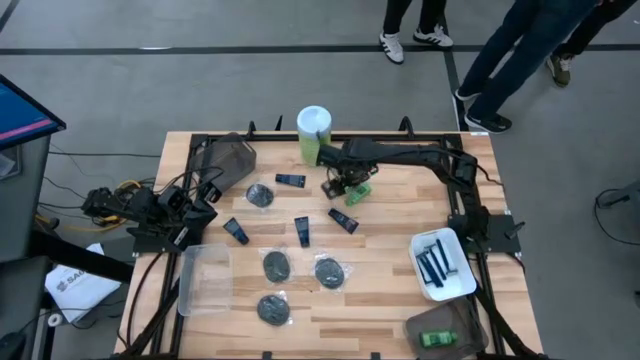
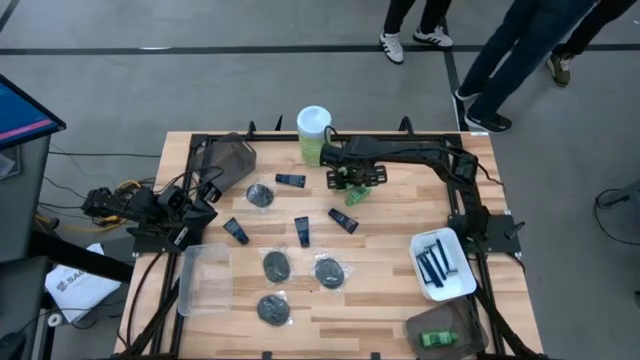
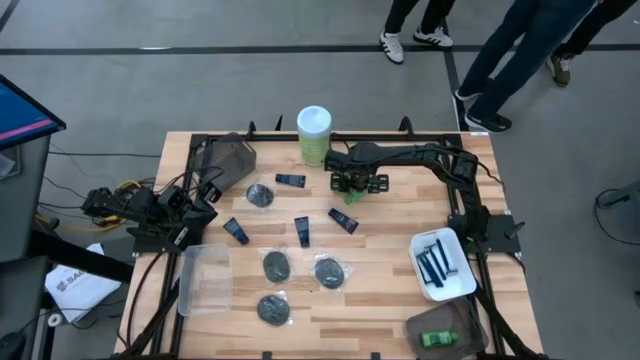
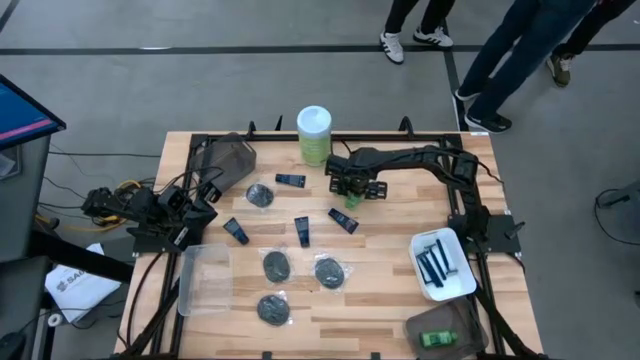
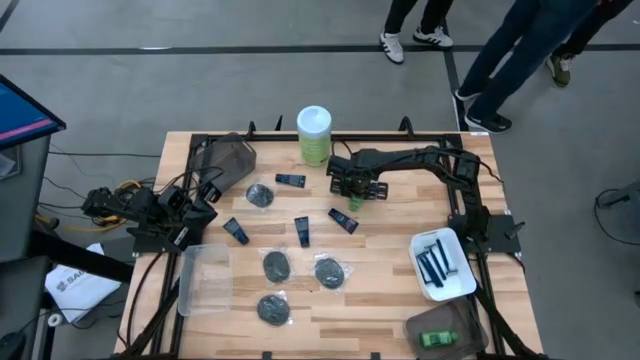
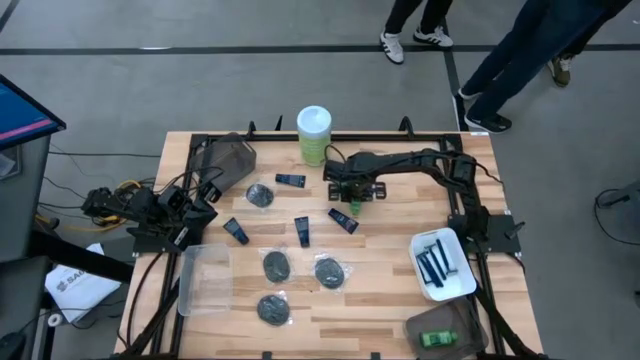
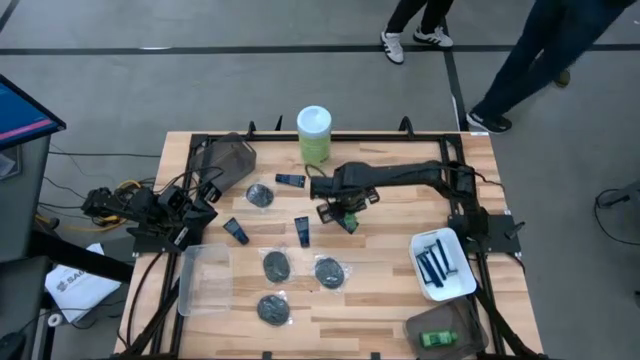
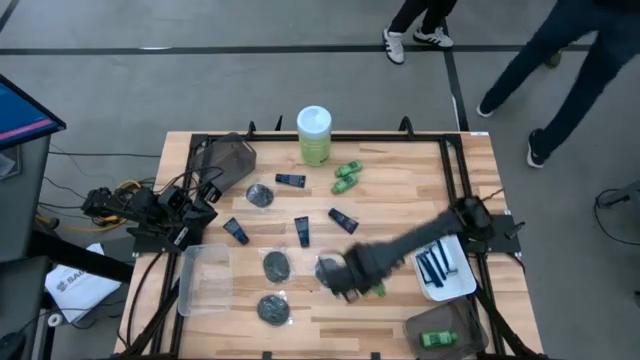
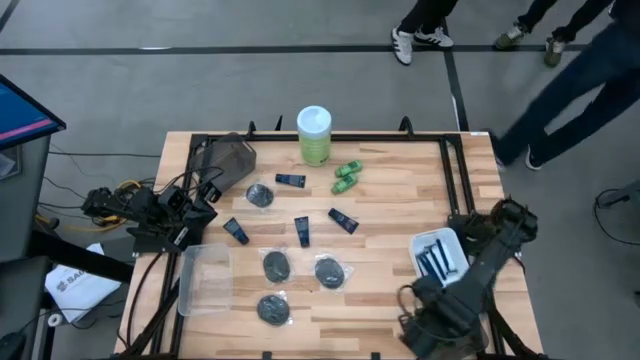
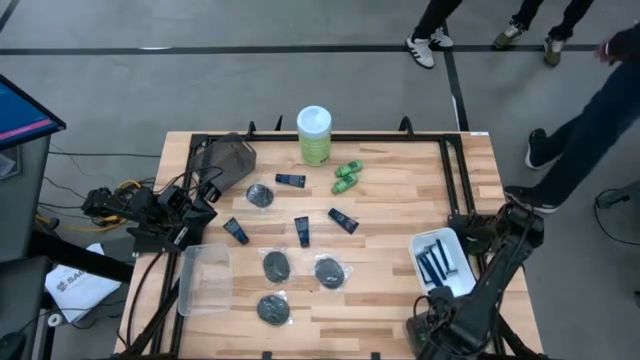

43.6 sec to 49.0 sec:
Task: Pick & Place Travel size toiletries
Put the green shampoo into the bottom black bin

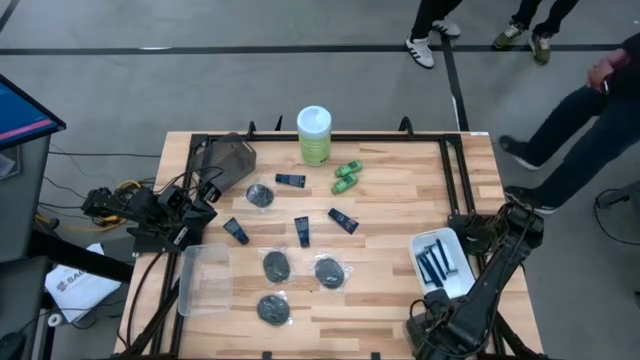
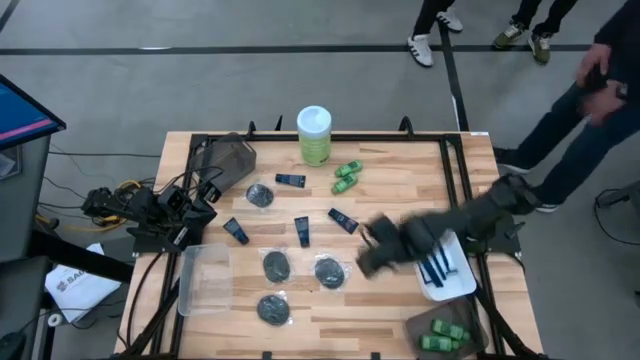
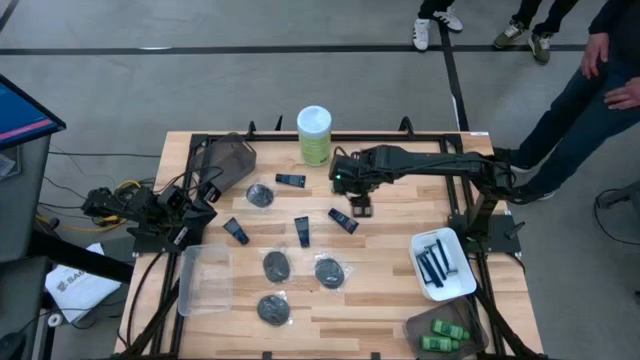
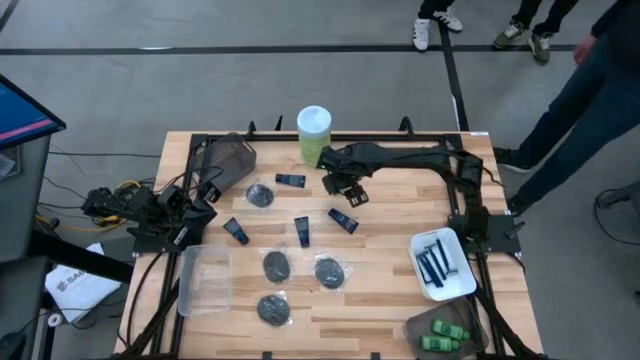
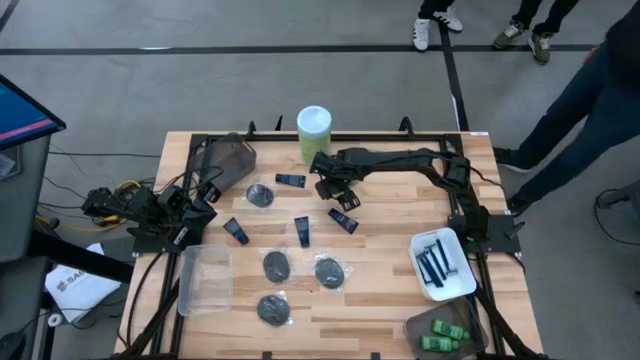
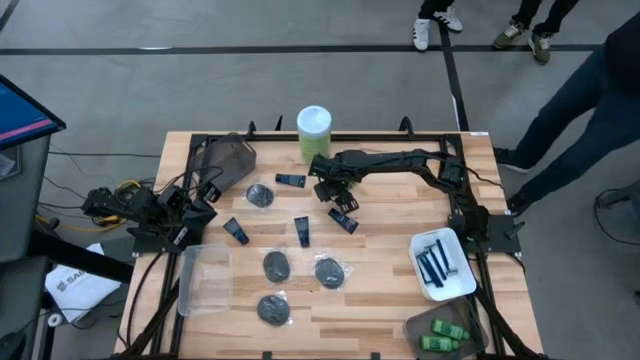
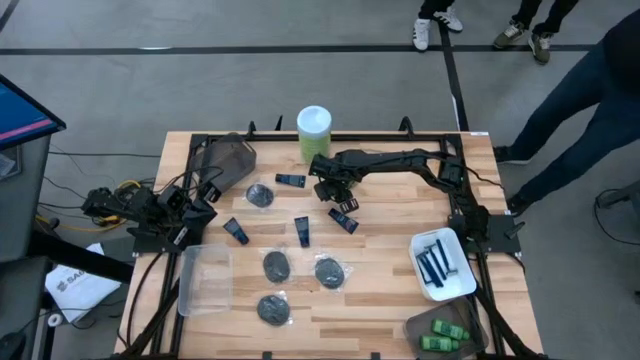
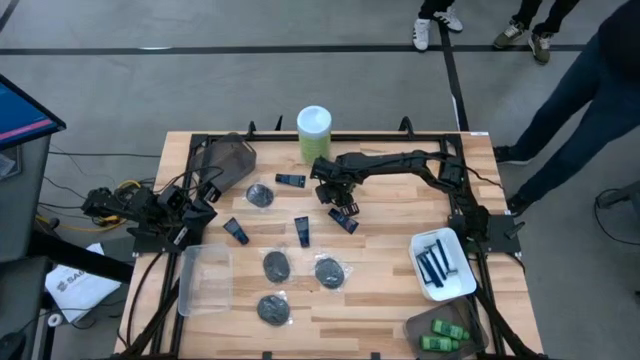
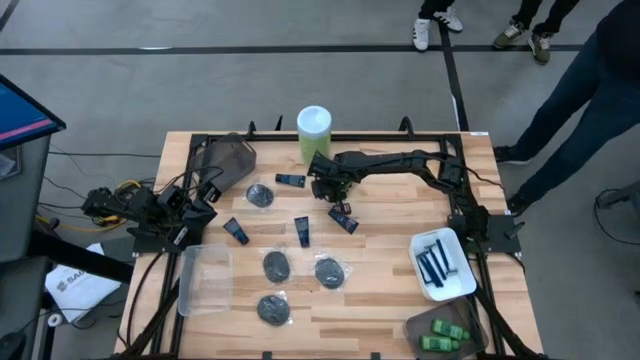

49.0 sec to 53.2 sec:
Put the green shampoo into the bottom black bin

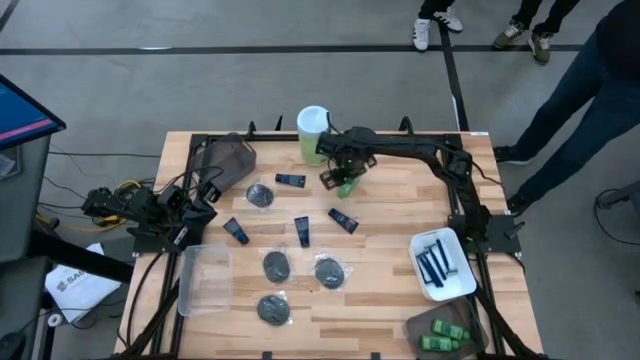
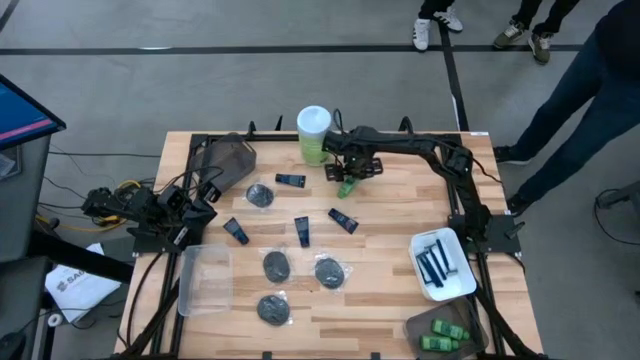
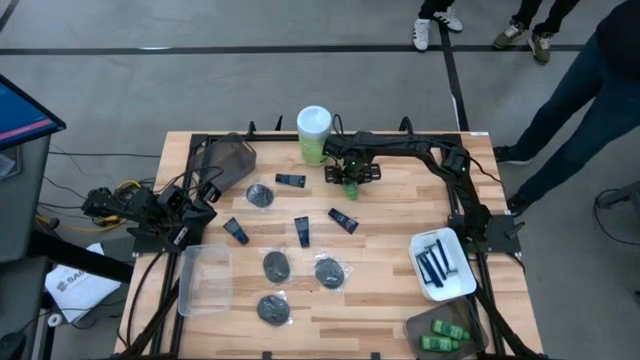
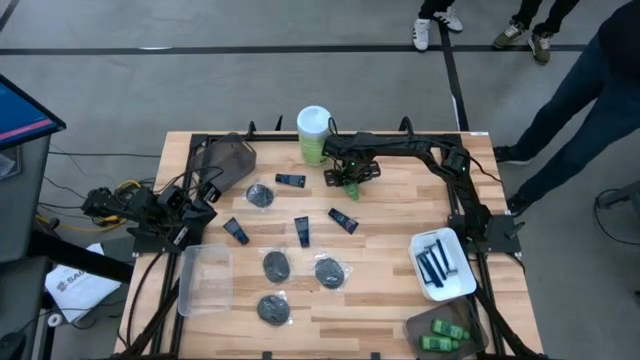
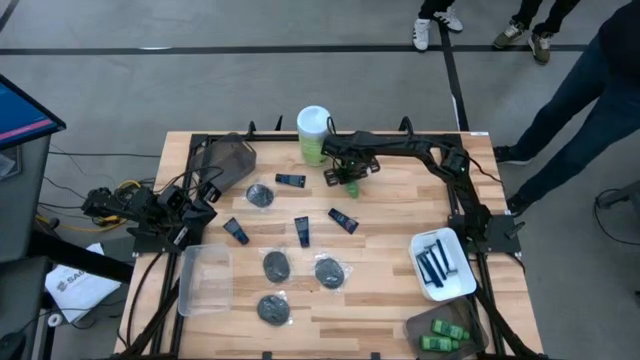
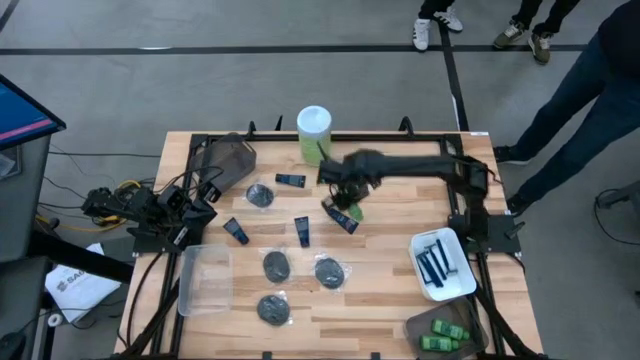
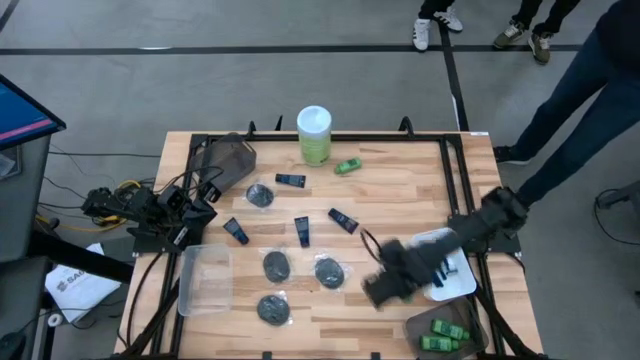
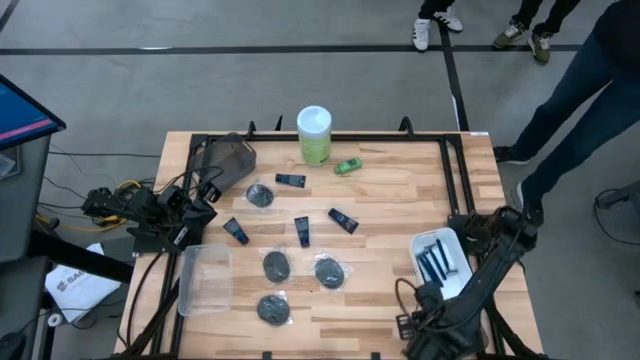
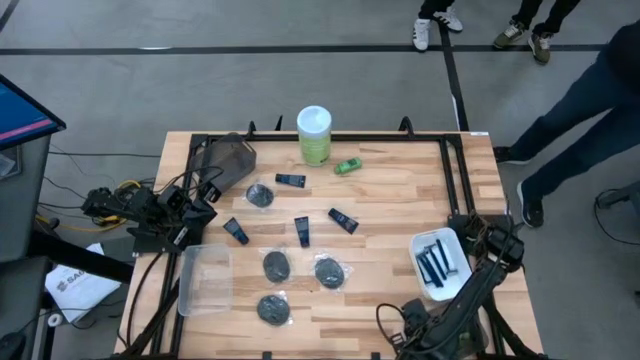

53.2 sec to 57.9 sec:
Put the green shampoo into the bottom black bin

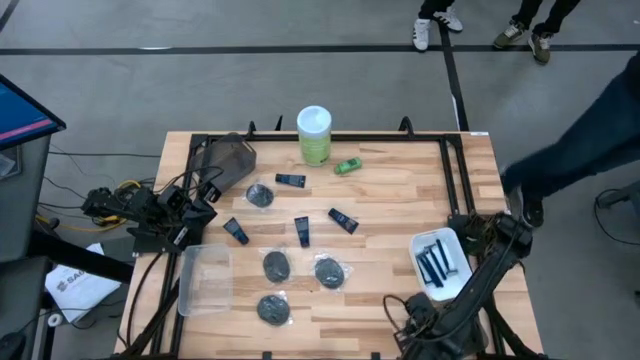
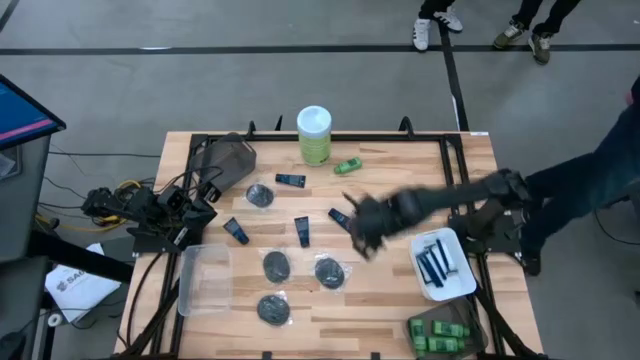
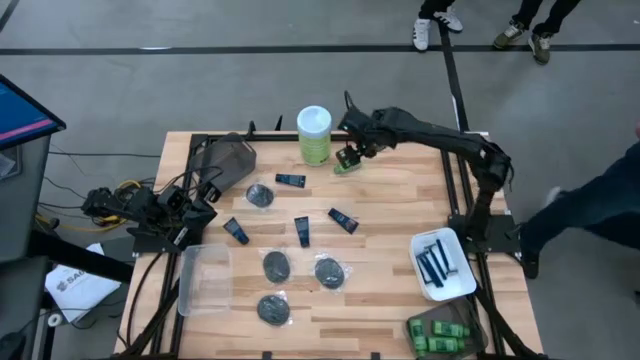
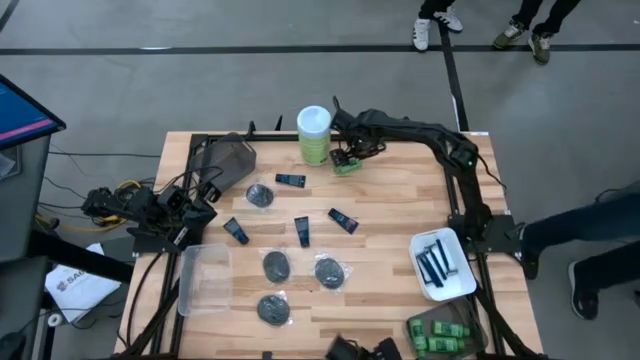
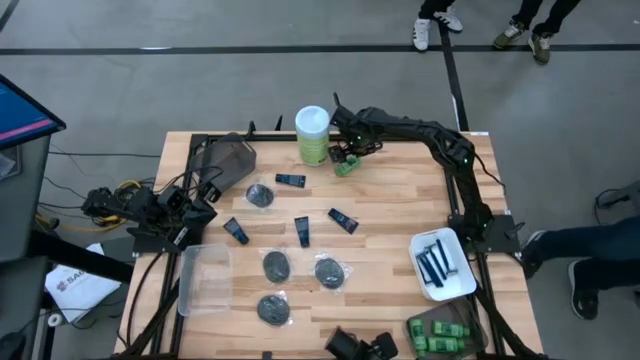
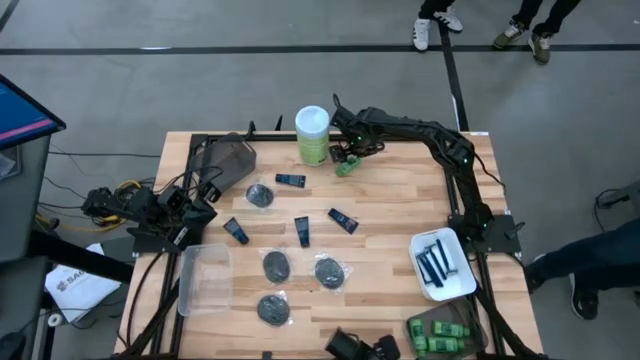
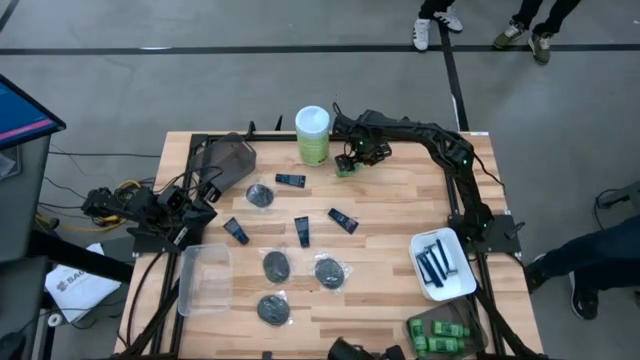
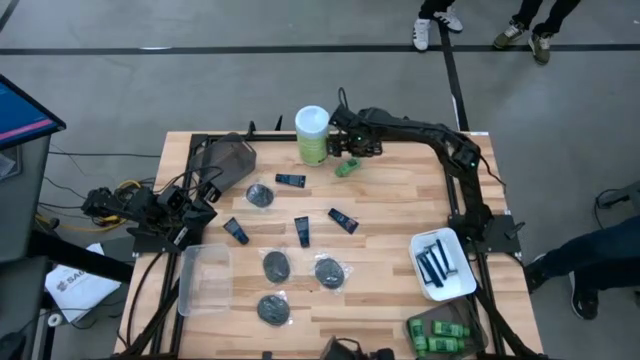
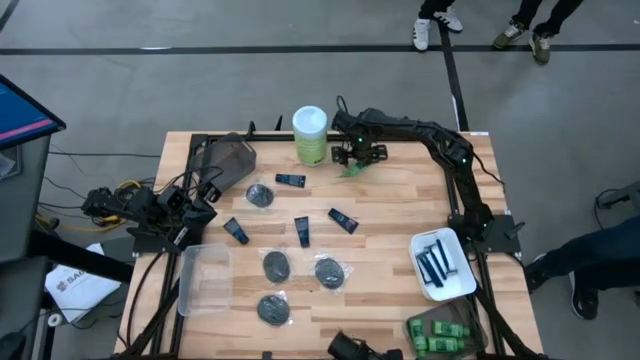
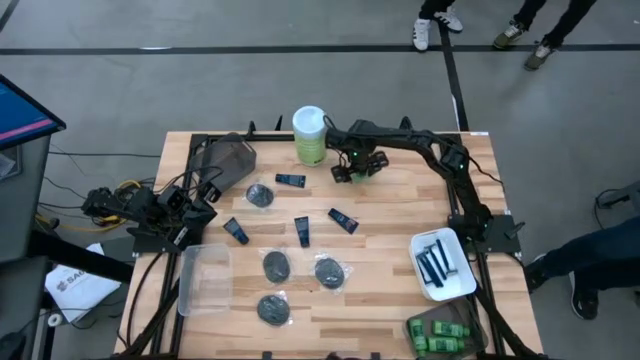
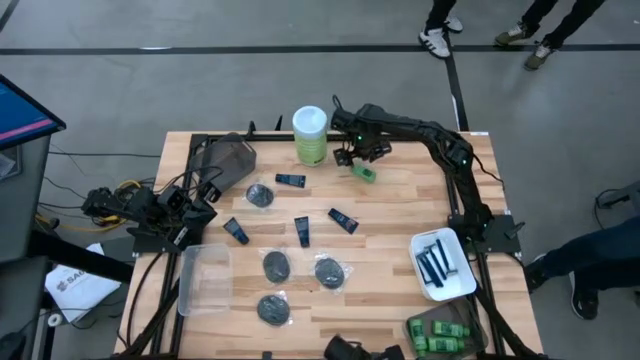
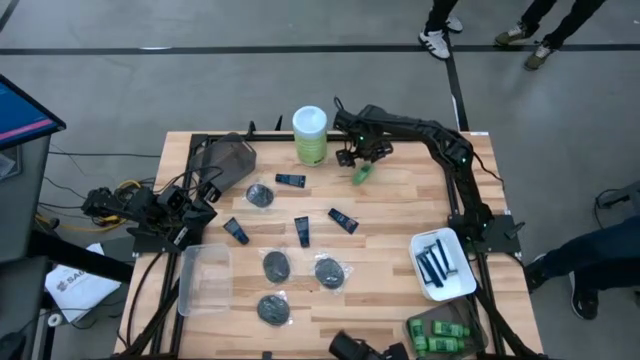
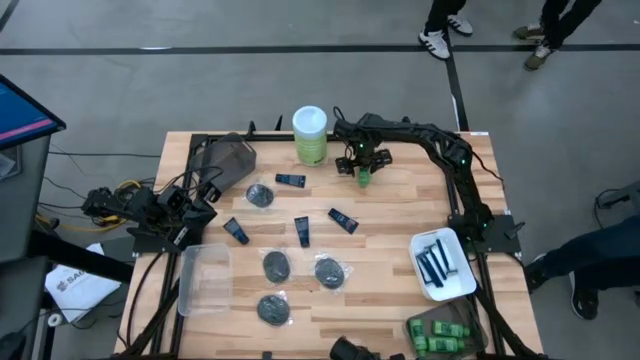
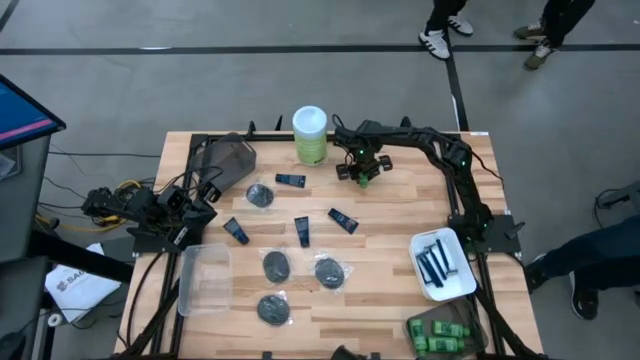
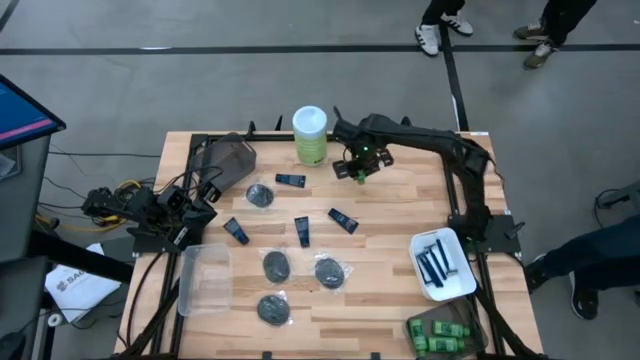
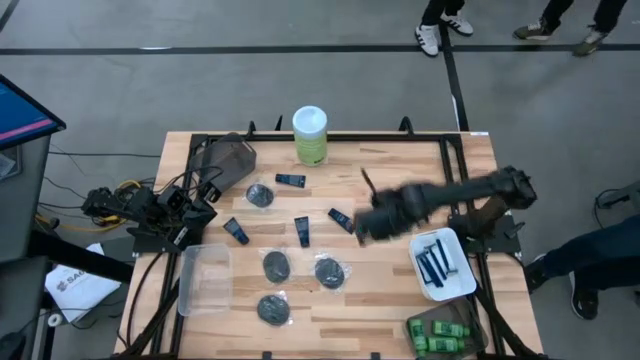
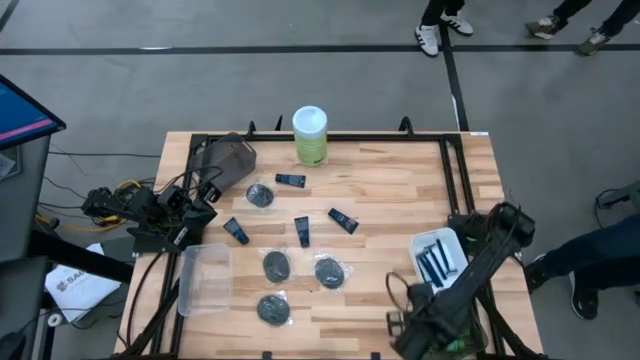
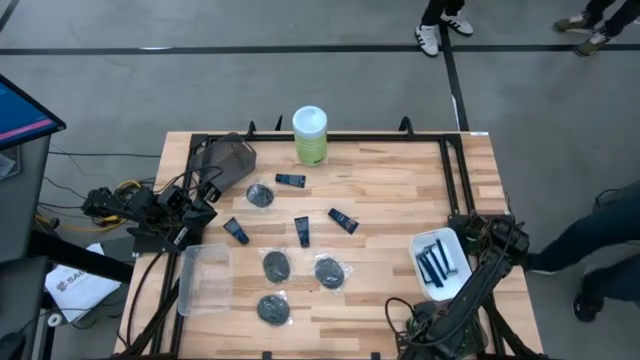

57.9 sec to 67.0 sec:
Put the green shampoo into the bottom black bin
